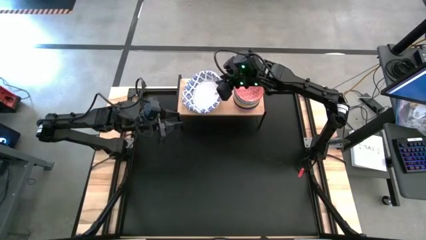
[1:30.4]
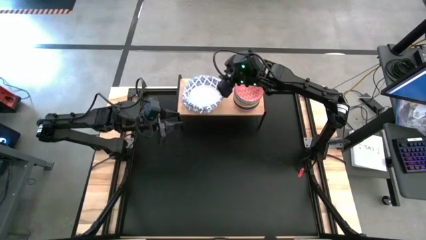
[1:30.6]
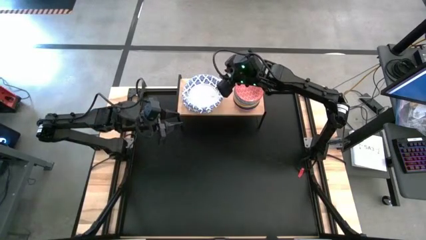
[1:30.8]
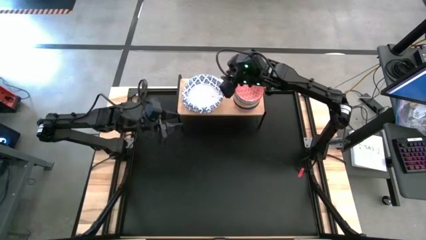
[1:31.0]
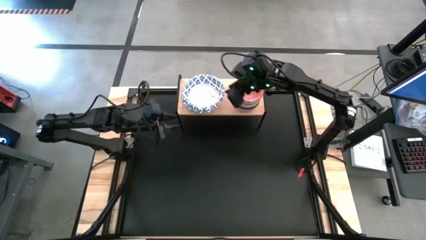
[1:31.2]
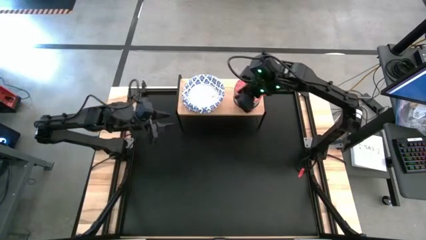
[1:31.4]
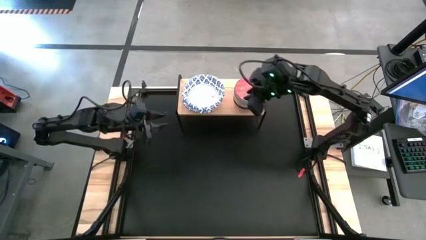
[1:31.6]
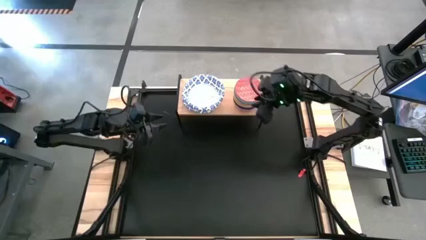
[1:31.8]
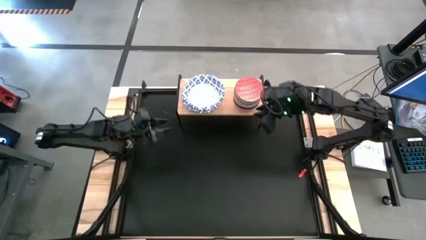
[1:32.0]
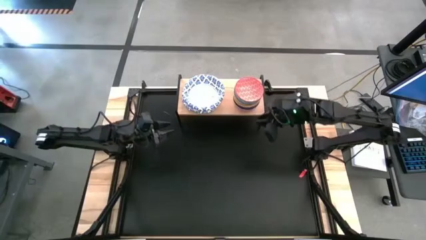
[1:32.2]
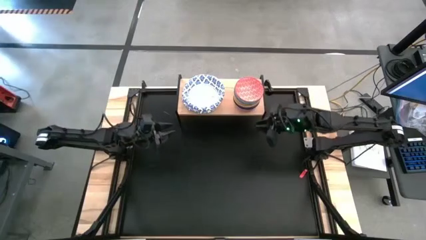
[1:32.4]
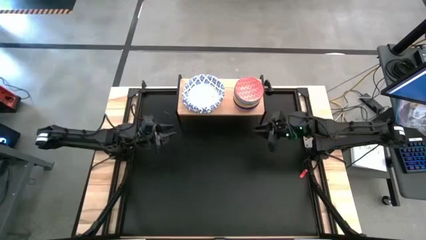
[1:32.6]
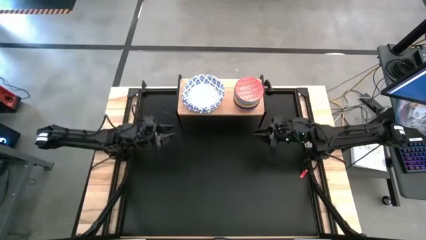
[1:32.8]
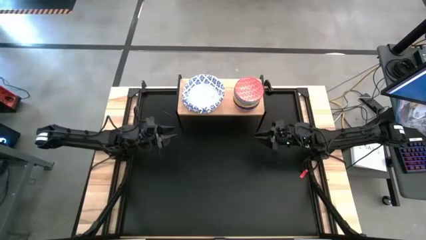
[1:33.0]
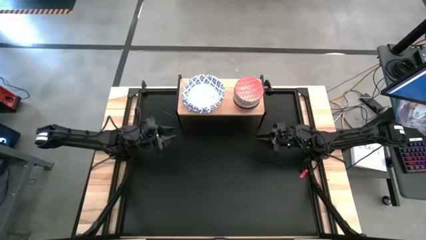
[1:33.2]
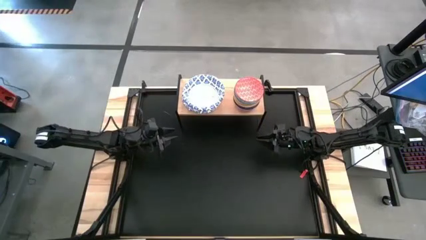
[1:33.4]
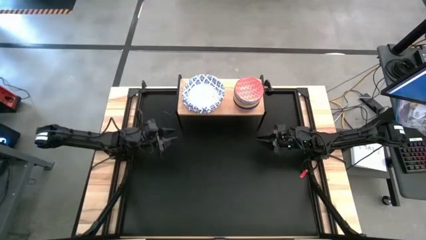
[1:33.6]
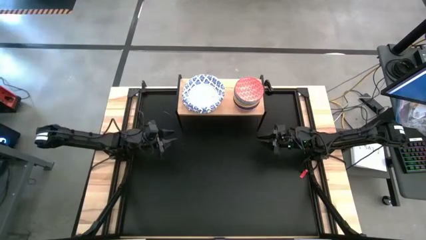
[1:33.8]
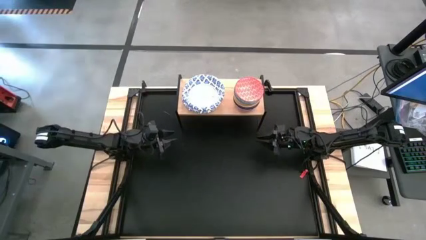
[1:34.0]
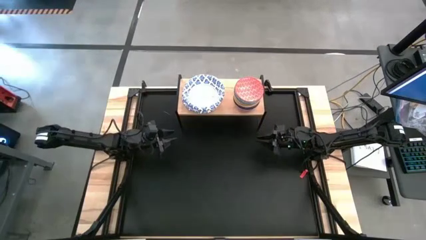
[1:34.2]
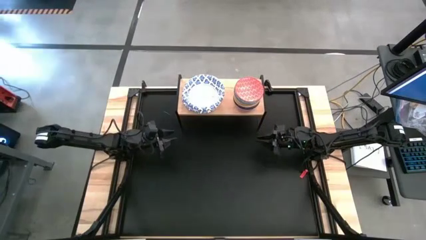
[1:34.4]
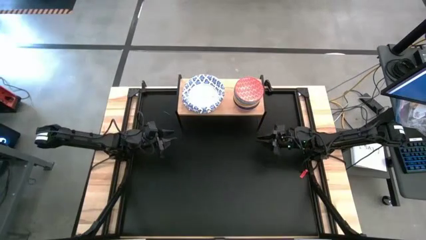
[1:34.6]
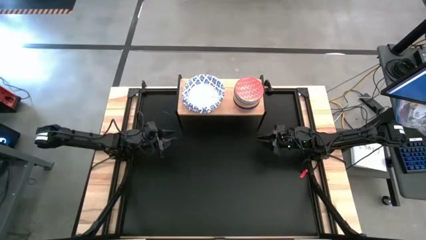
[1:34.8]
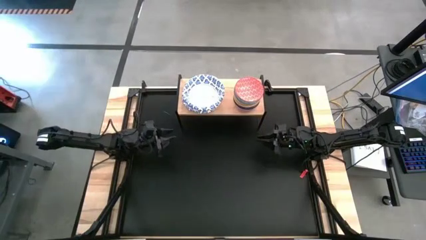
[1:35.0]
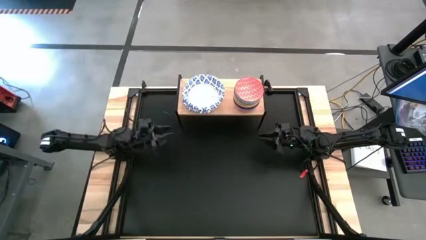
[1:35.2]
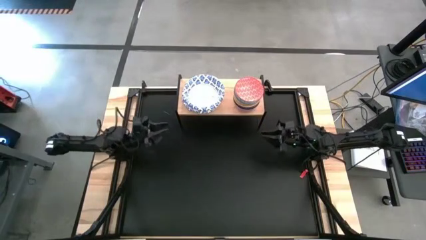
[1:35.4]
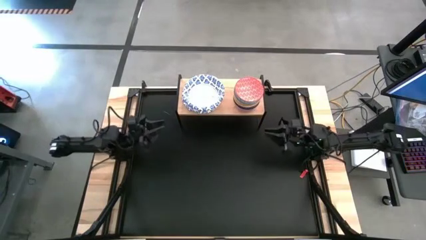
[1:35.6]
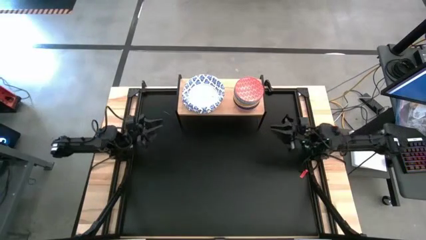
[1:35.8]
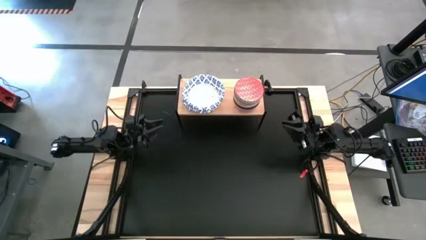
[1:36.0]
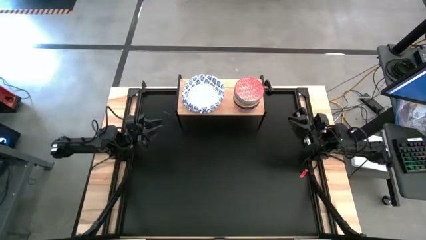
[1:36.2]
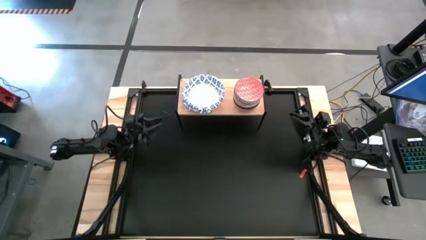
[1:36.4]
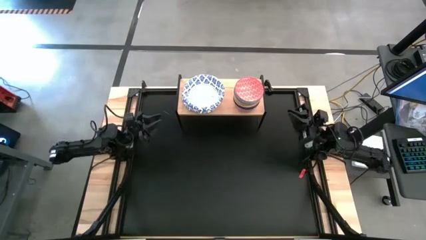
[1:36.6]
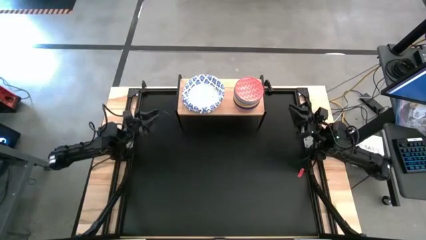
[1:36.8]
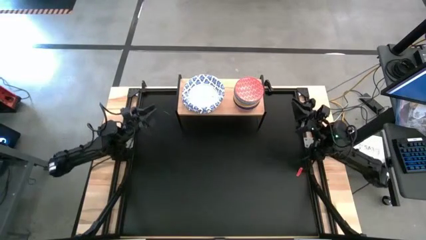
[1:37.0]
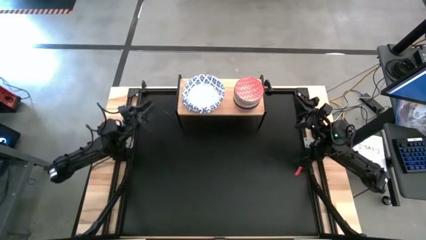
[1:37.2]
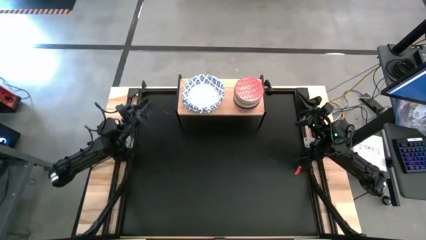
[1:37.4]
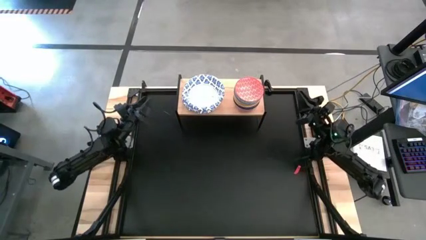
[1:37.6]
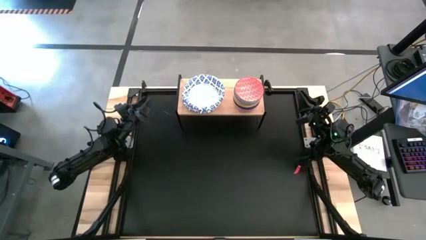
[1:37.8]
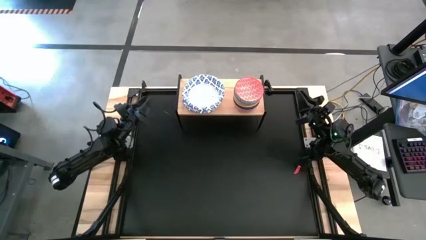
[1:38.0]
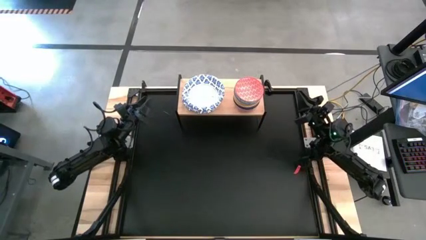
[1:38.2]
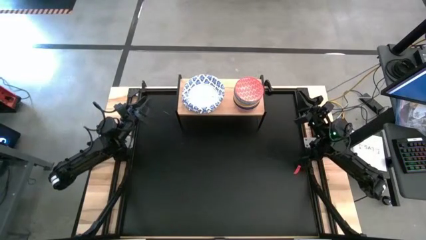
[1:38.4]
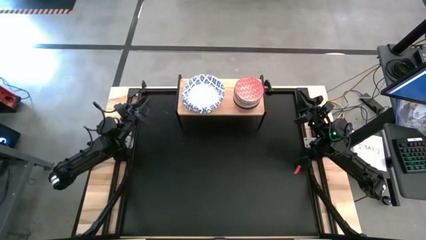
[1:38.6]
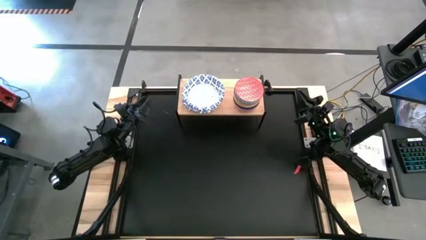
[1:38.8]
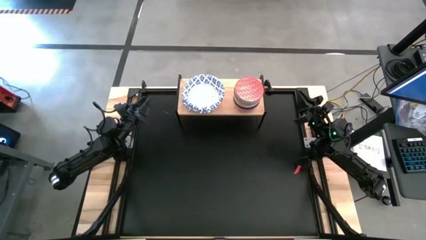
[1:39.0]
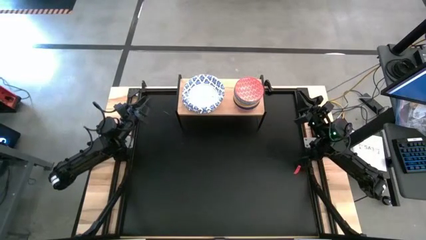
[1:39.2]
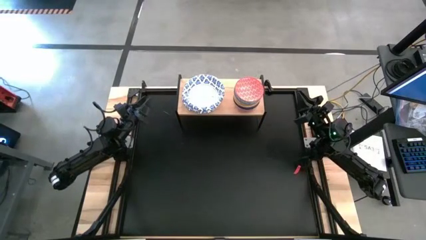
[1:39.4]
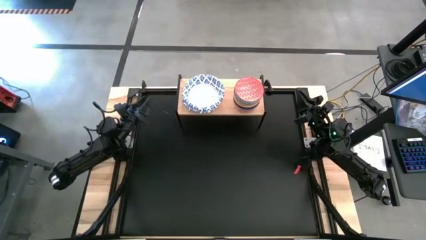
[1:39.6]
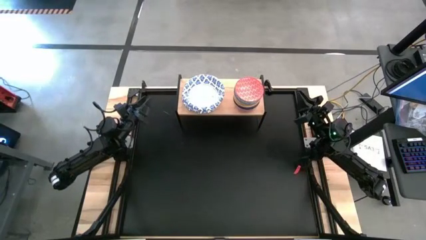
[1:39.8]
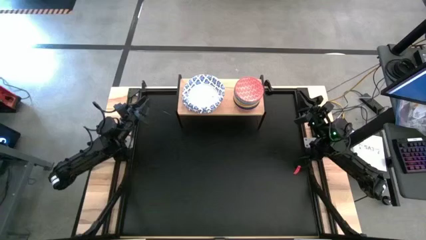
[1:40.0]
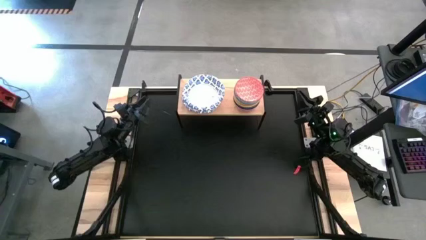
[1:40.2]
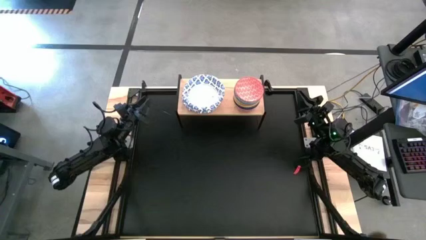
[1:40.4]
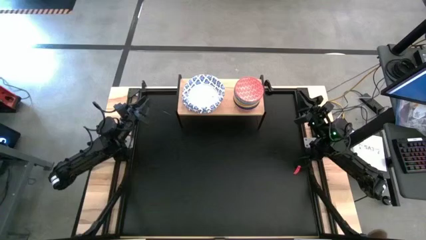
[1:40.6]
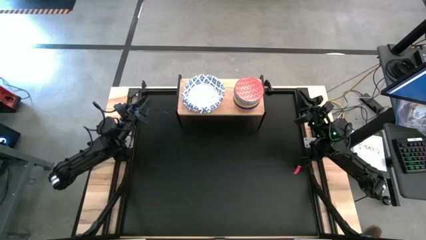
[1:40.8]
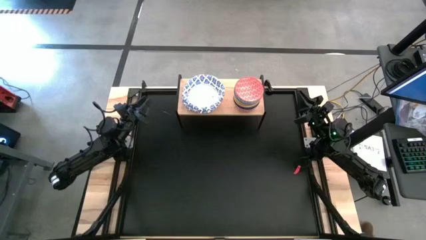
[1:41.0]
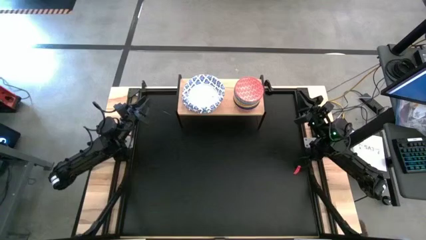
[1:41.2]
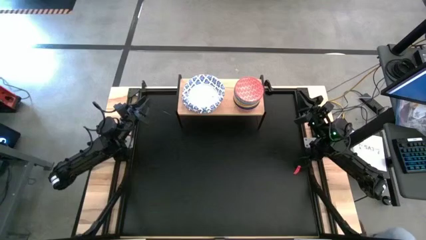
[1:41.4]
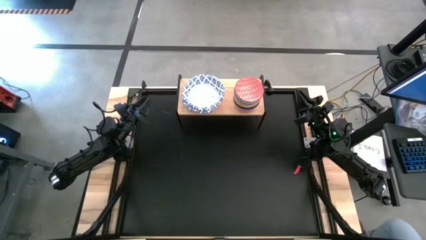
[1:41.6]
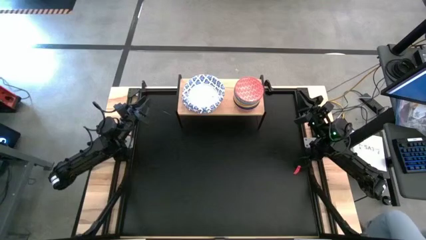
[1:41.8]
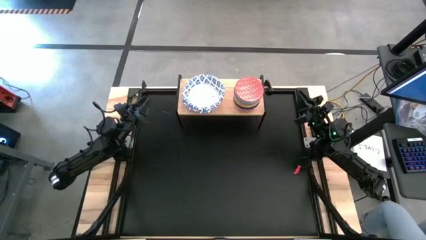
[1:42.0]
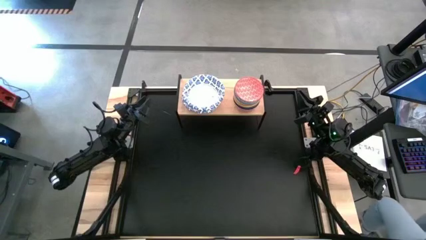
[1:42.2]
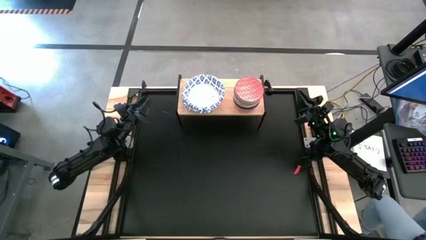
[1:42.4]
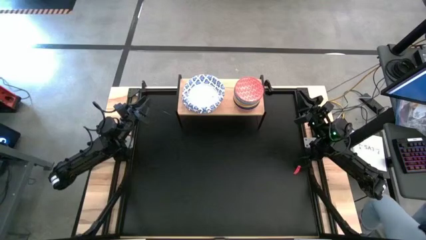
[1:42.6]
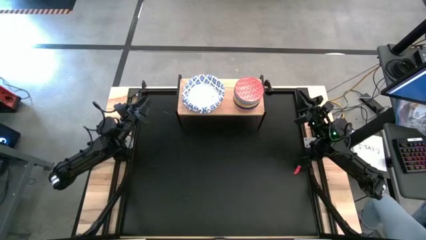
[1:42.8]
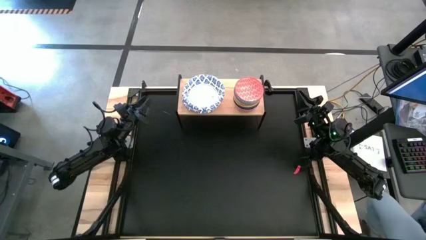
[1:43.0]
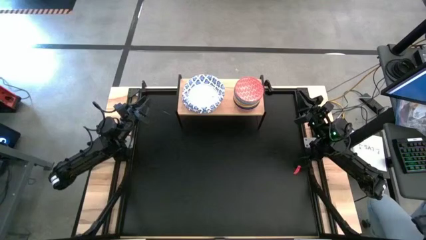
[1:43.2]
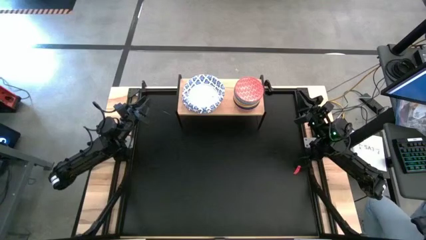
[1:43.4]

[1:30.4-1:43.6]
Task: Place and stack bowls onto a shelf
Return to Home Position
